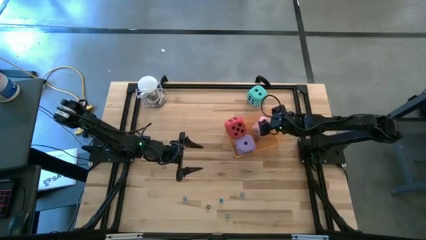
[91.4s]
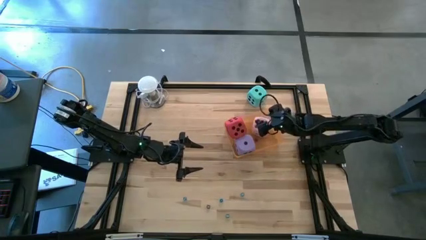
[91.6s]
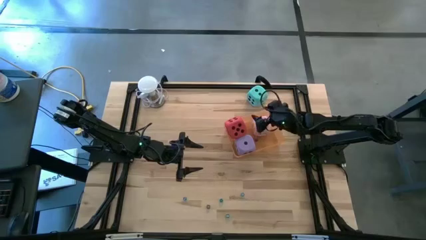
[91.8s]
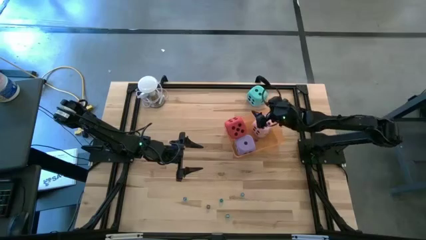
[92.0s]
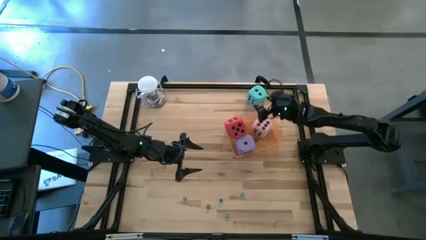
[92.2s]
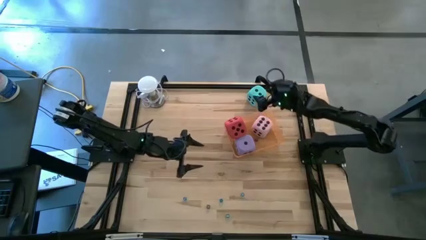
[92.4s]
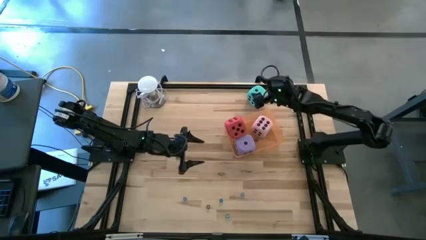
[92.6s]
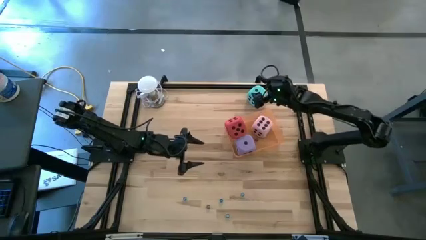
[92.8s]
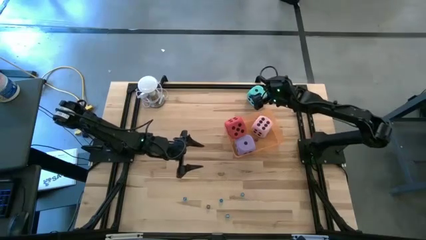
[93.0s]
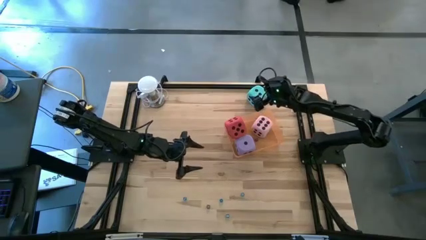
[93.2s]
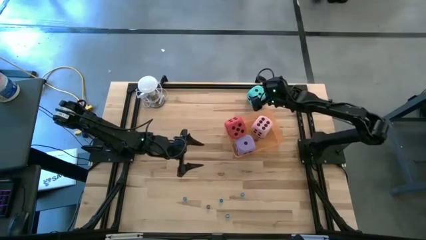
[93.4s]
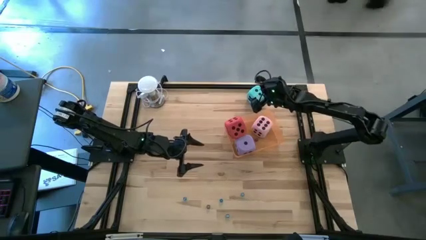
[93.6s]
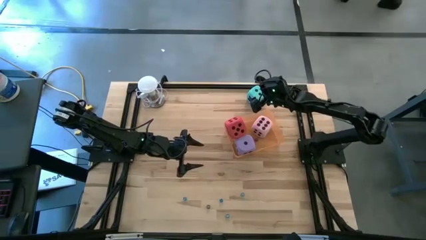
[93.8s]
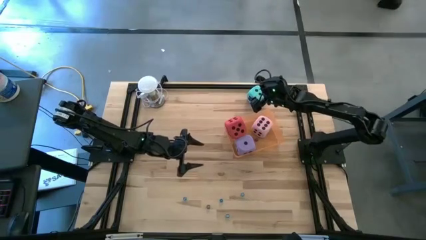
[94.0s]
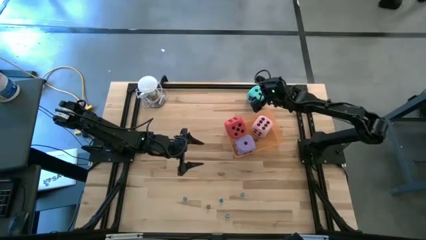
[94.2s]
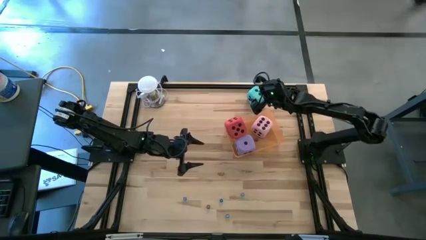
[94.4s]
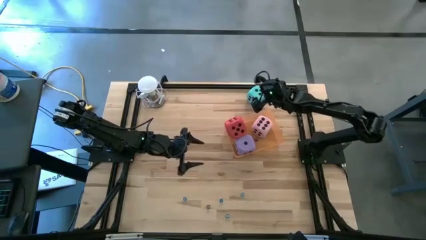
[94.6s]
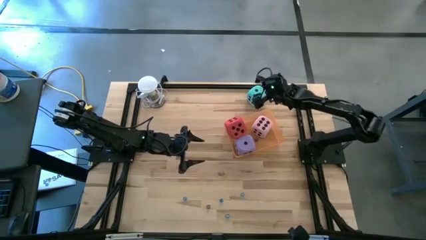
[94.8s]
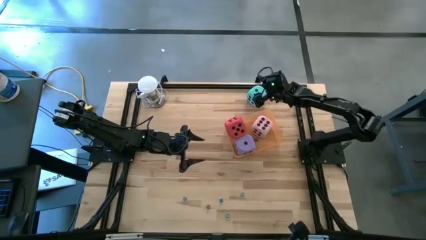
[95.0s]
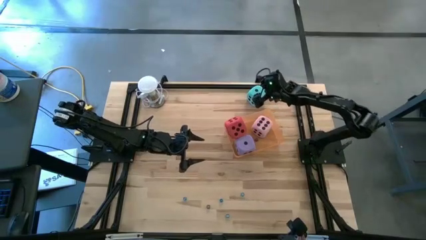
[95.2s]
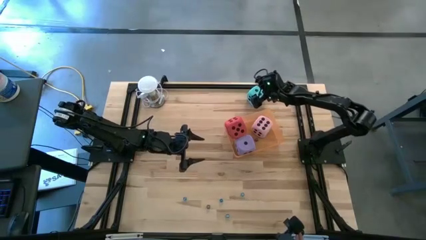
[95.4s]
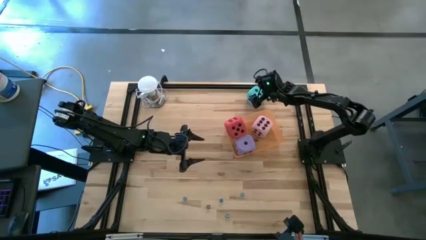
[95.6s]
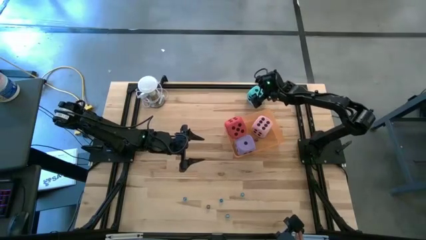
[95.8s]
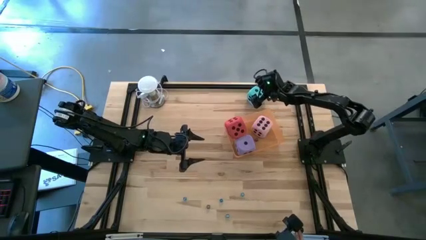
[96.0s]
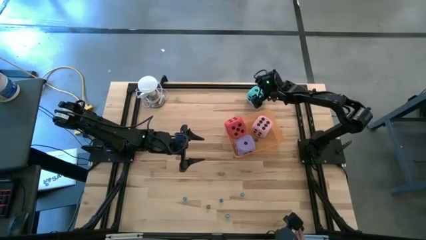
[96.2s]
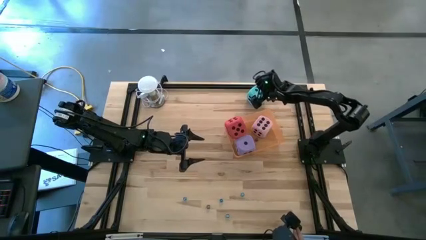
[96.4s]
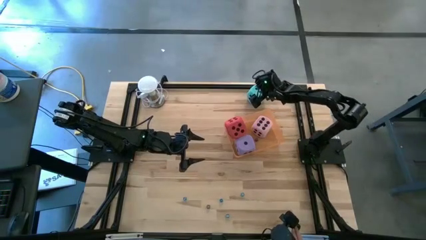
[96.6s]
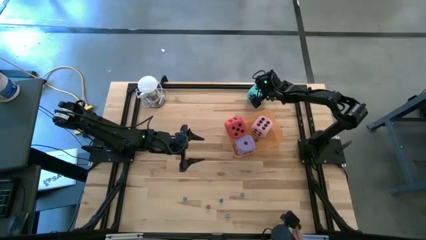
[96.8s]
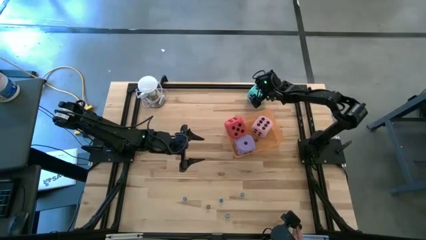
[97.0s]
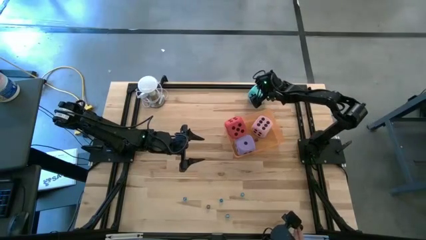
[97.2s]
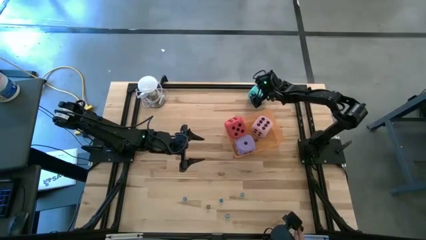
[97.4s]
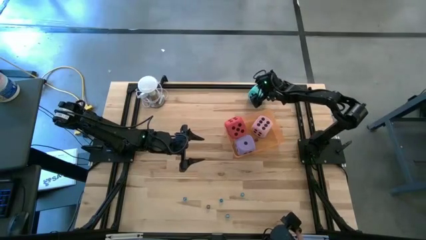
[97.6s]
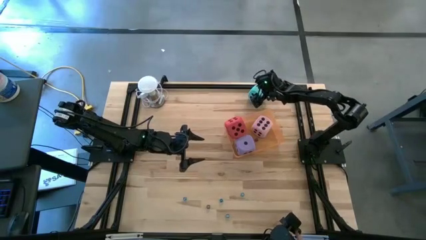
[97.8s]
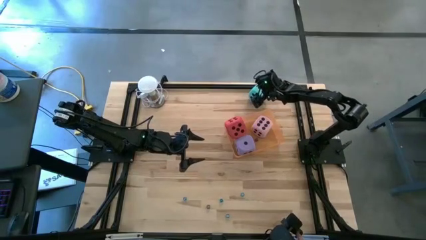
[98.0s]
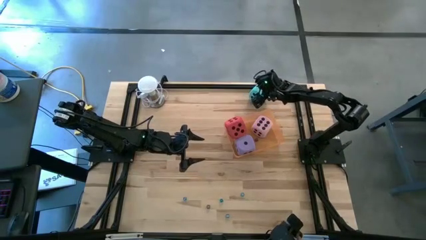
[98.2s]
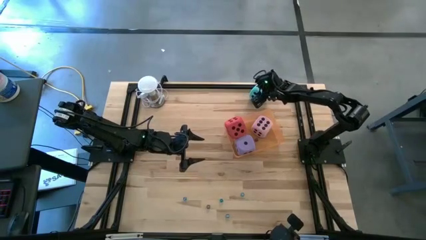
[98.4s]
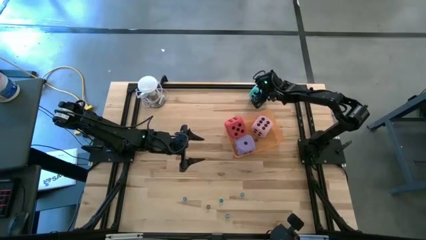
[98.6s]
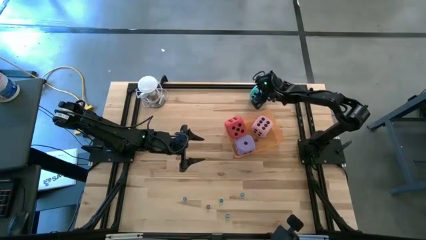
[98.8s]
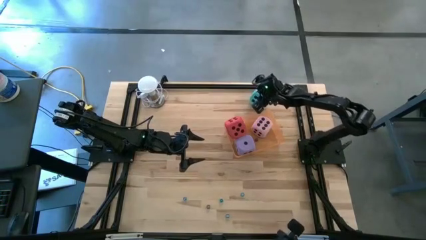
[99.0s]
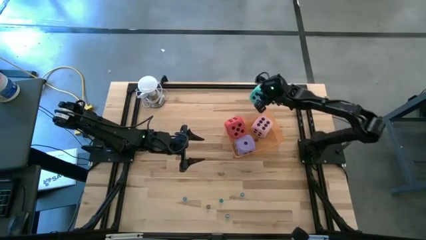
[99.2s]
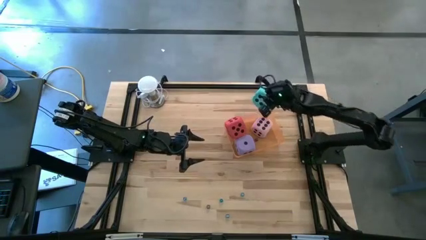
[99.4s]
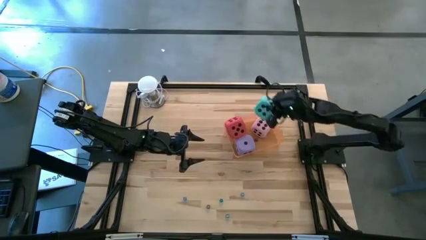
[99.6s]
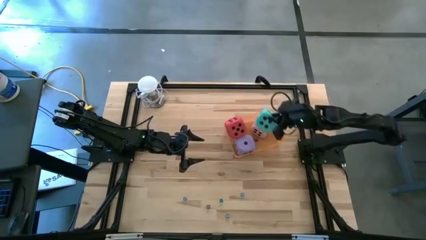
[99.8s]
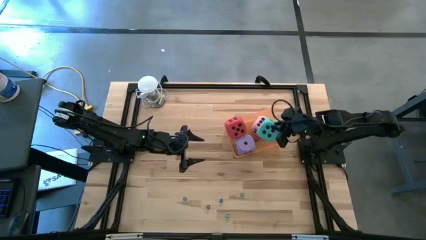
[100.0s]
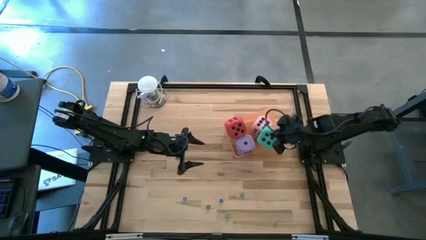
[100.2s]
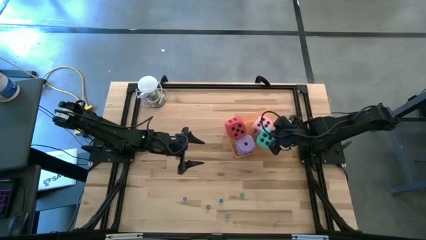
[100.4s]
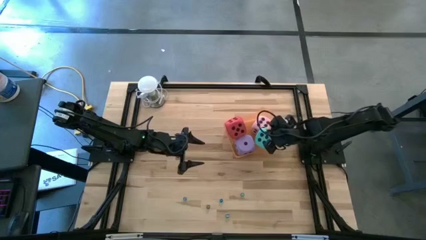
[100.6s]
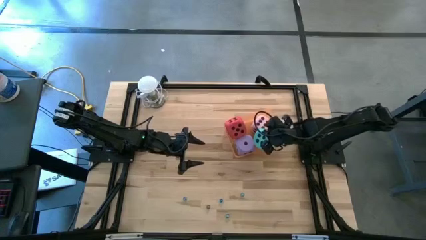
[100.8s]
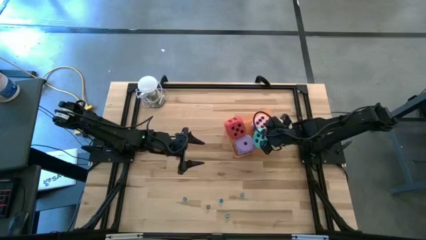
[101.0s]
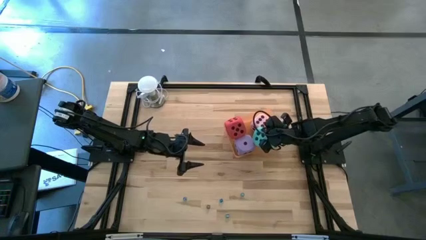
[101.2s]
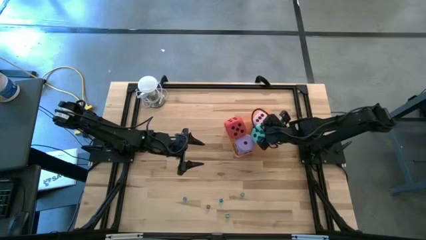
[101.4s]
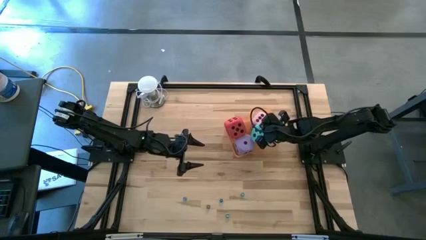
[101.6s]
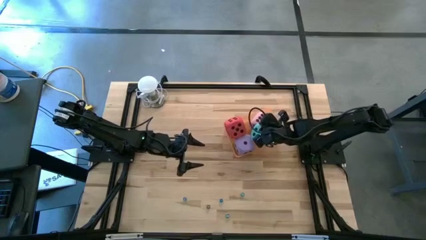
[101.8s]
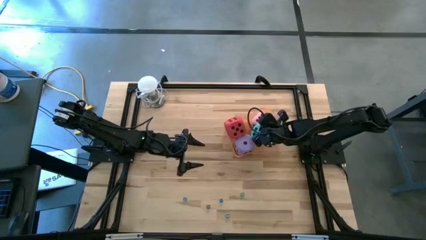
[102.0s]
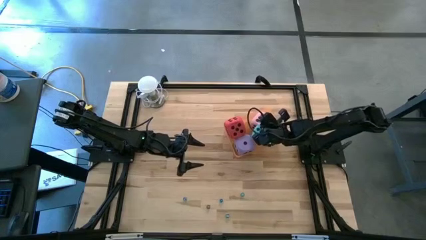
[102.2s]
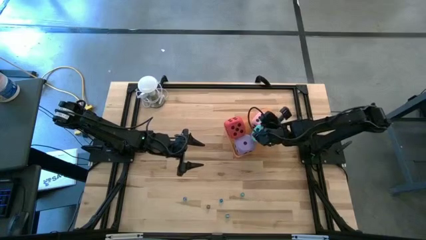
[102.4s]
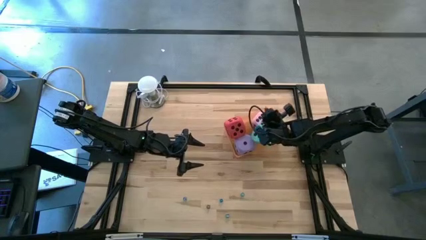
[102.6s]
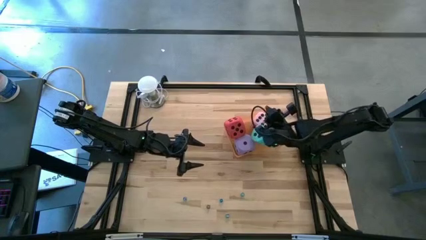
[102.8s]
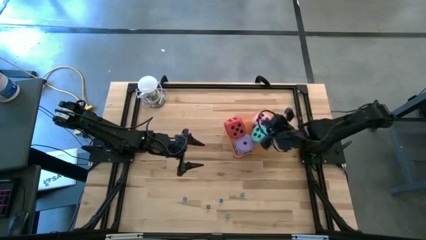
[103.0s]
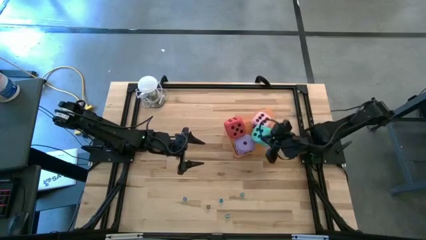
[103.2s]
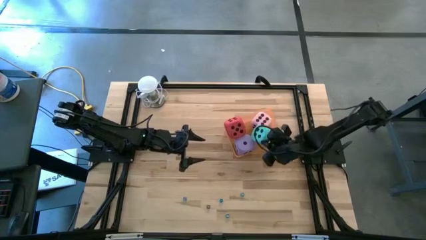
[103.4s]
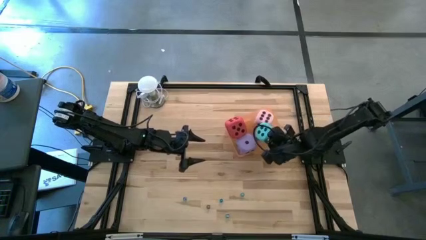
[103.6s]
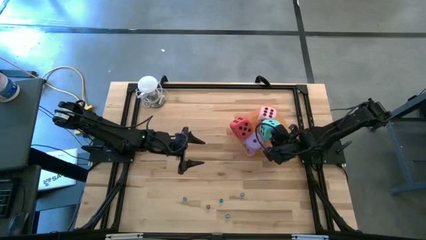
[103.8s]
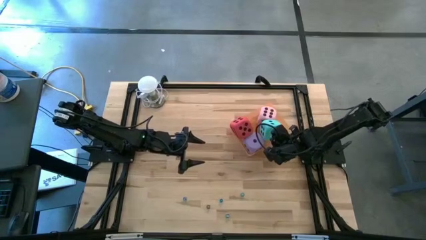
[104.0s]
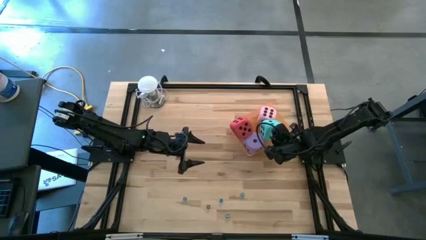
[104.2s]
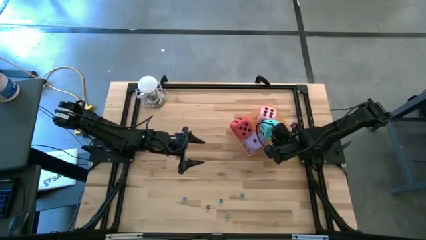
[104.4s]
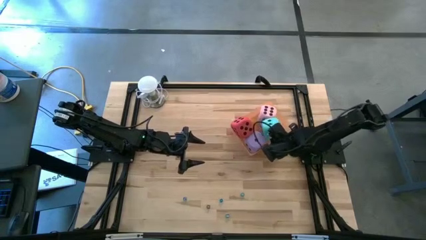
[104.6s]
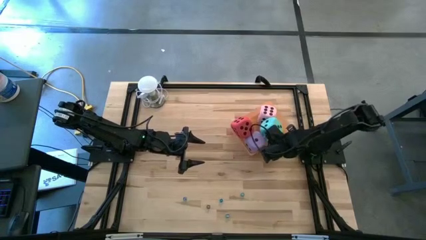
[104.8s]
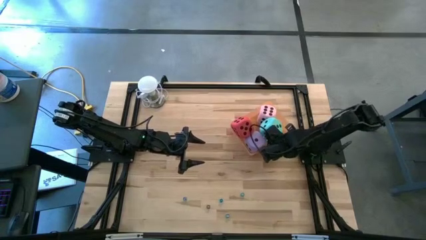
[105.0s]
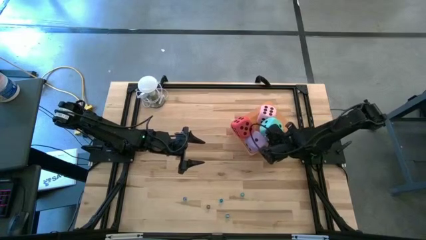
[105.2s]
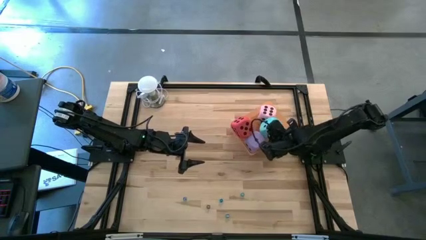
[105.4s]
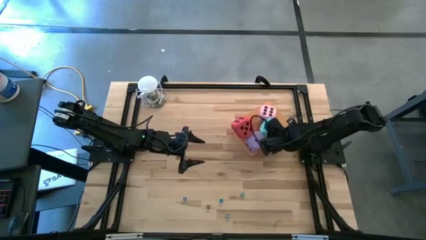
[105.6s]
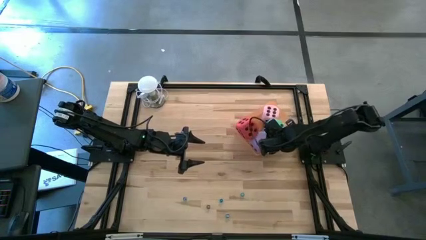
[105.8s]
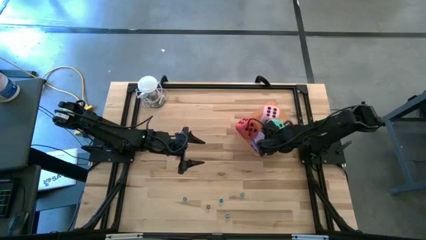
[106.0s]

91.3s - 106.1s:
Task: Pick & Place Dice
Put the large blue dice into the orange bin

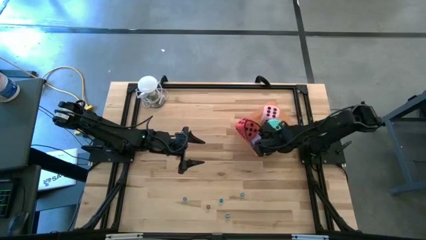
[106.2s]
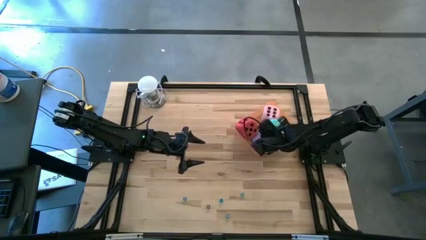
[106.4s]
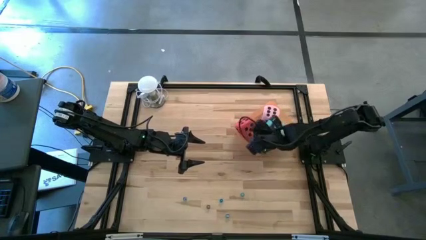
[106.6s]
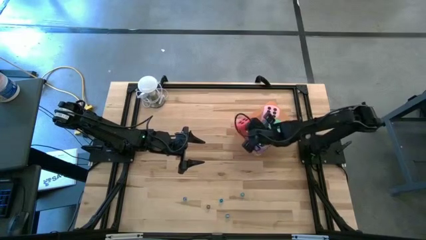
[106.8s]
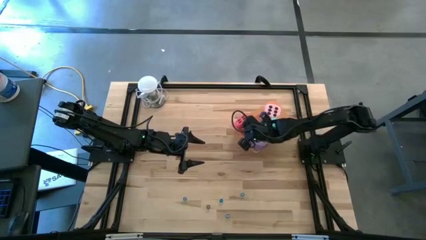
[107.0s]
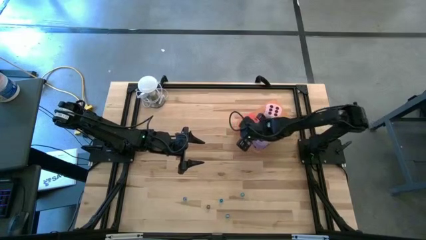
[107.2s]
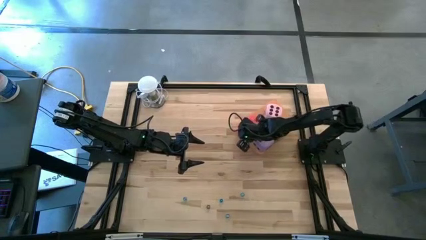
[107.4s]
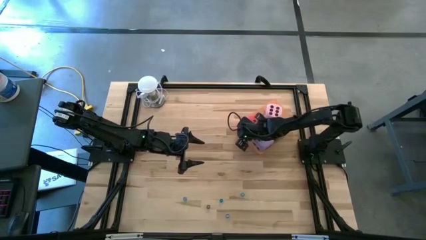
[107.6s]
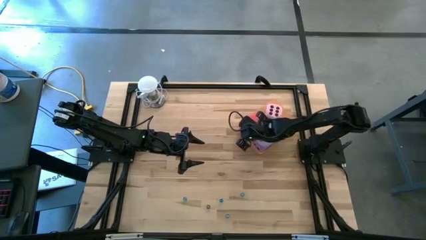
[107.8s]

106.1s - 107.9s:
Adjust the large red dice in the orange bin
